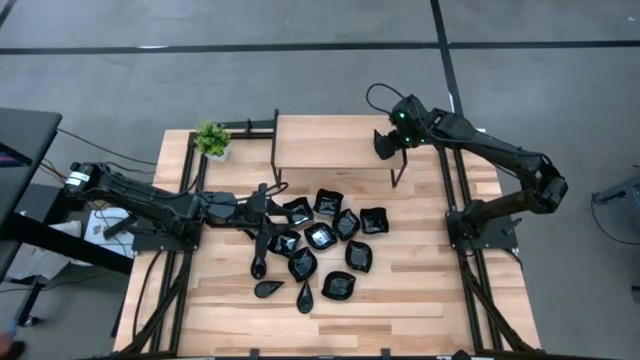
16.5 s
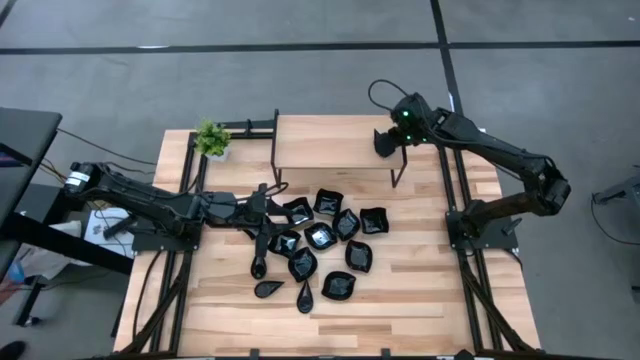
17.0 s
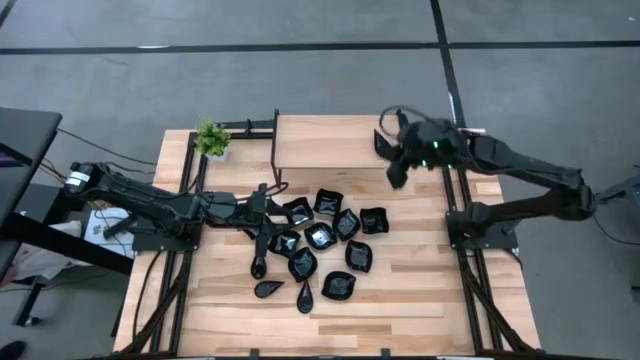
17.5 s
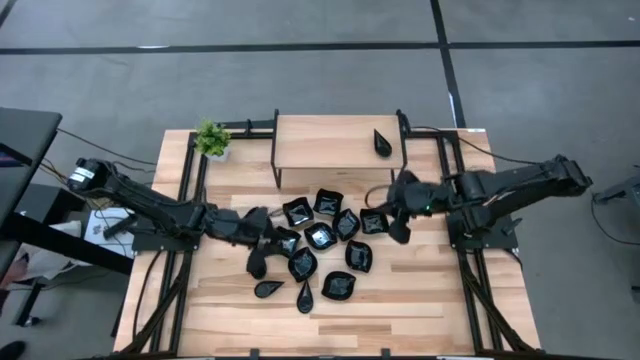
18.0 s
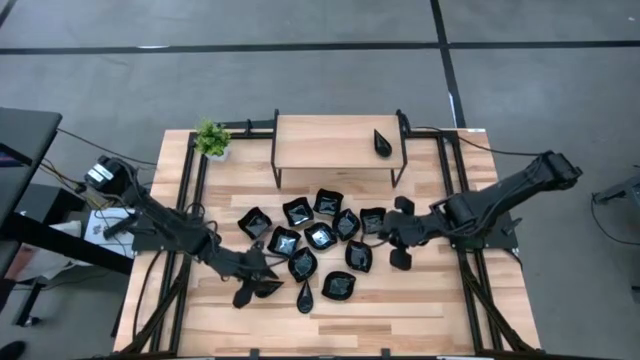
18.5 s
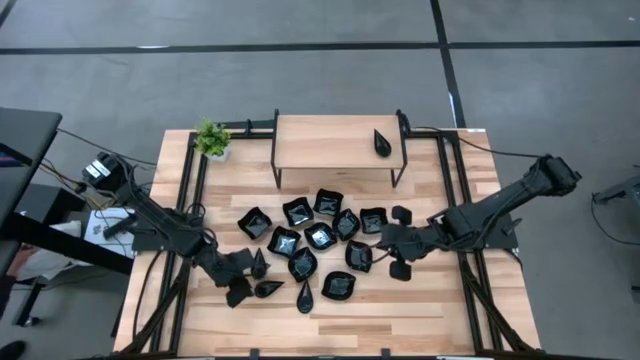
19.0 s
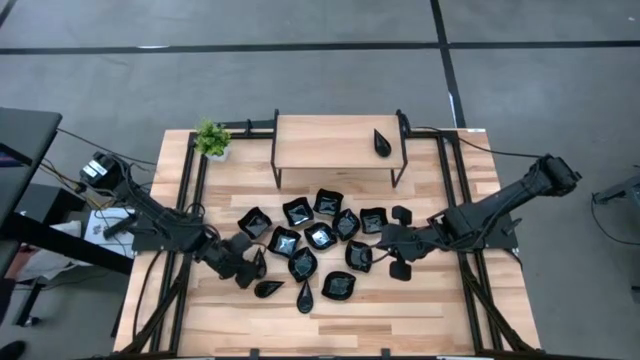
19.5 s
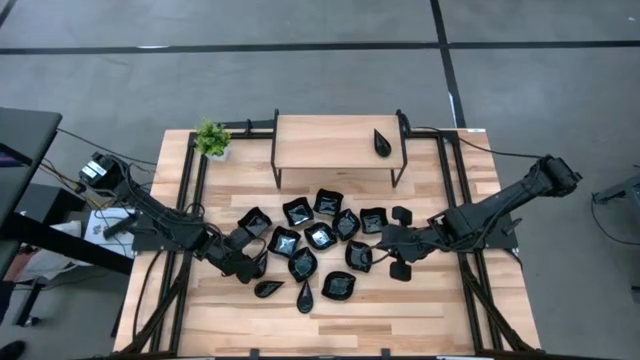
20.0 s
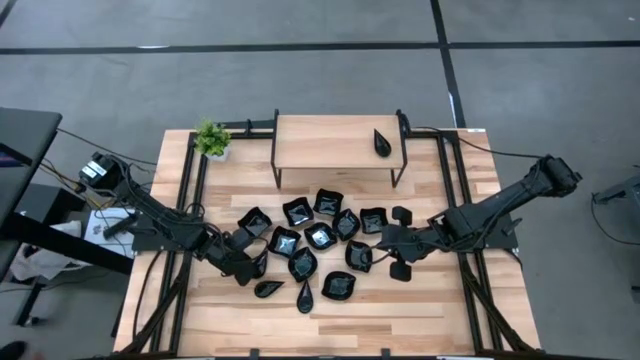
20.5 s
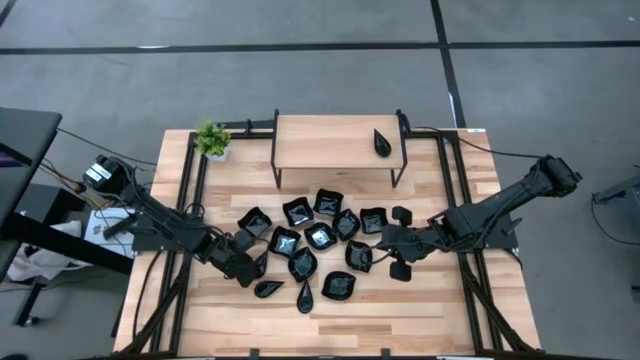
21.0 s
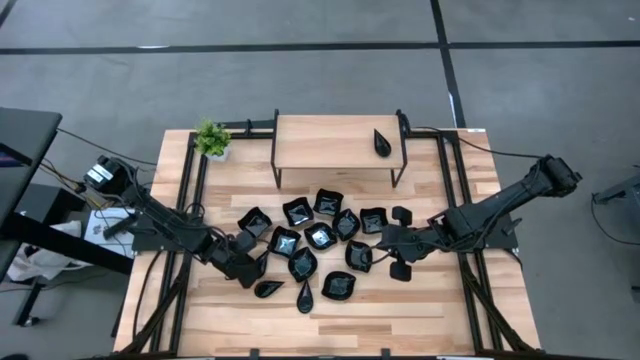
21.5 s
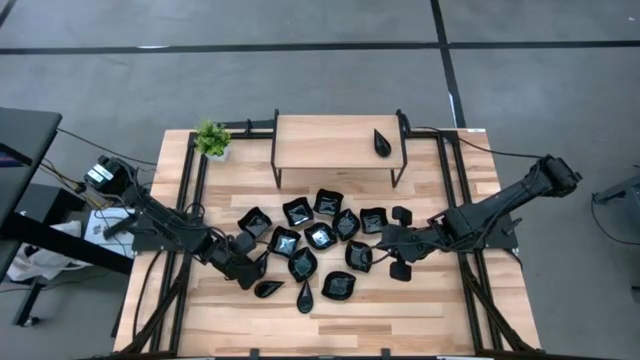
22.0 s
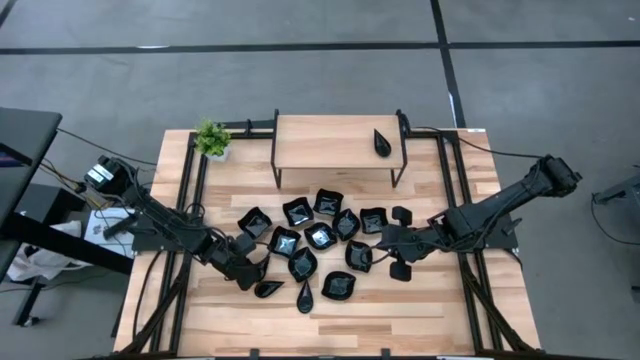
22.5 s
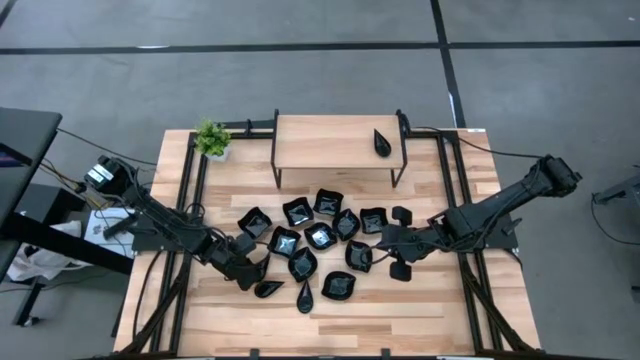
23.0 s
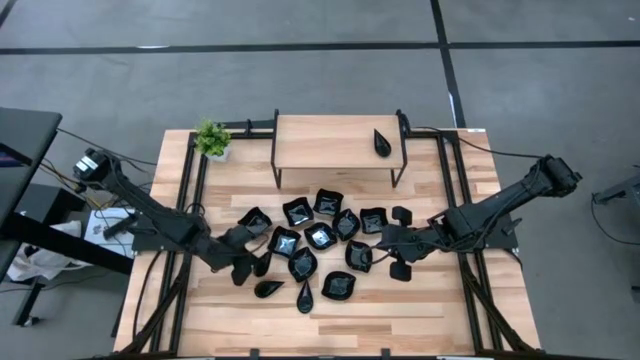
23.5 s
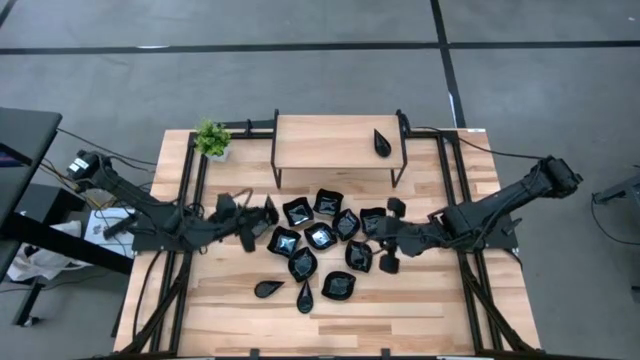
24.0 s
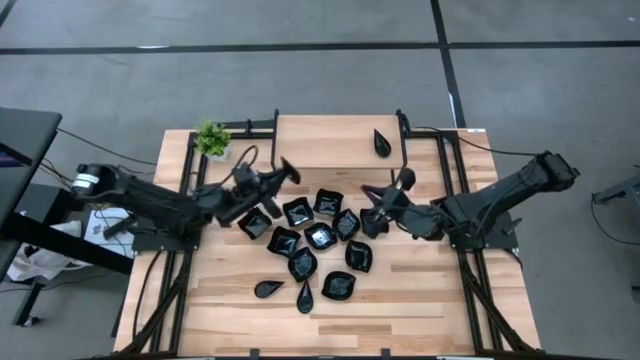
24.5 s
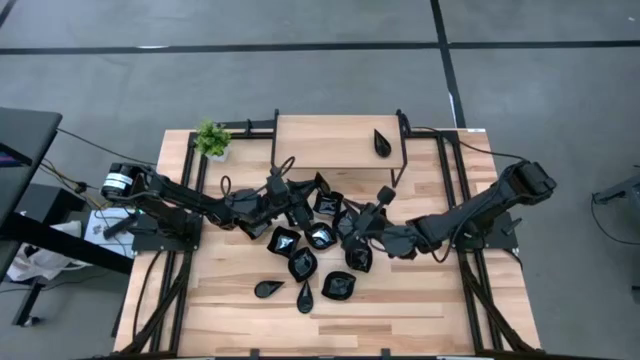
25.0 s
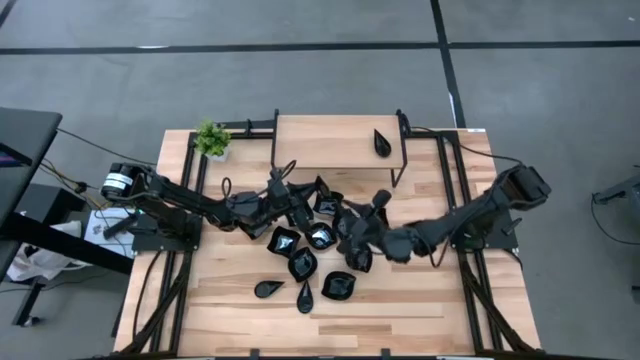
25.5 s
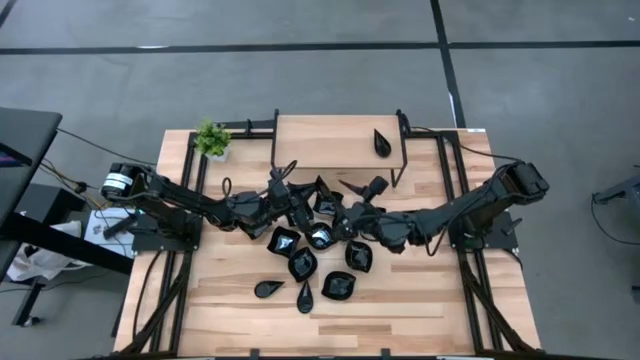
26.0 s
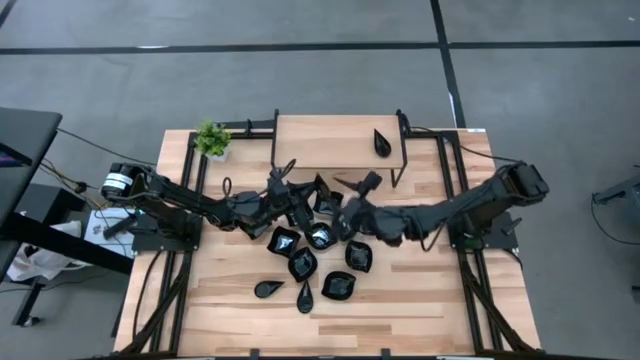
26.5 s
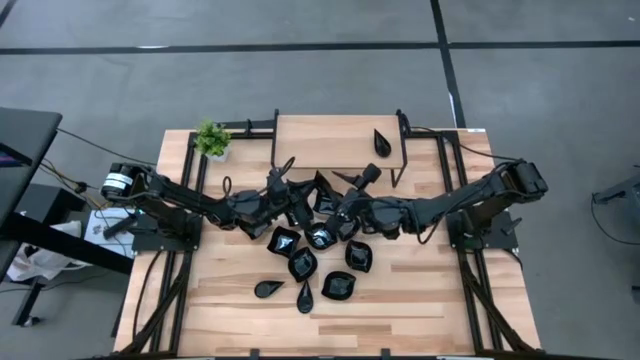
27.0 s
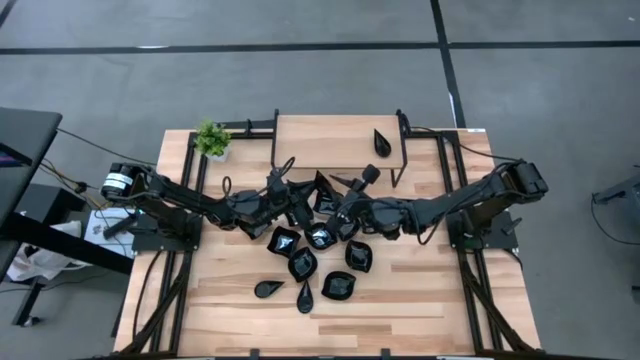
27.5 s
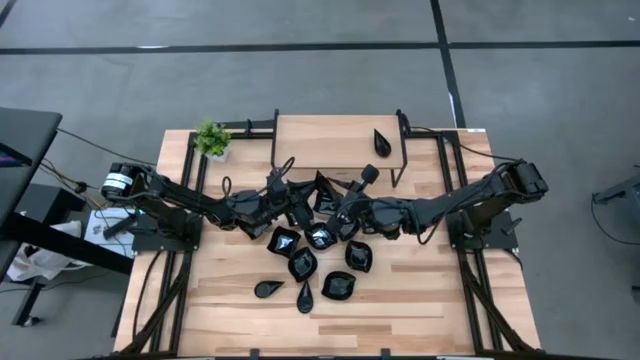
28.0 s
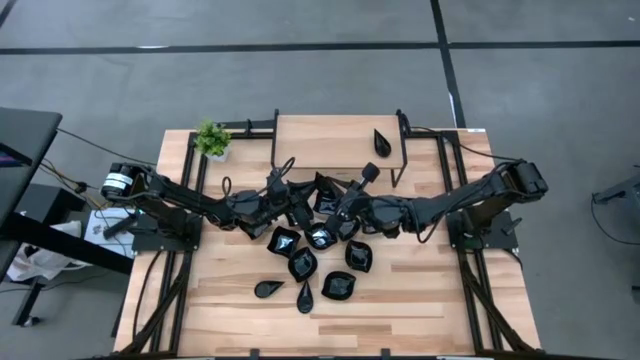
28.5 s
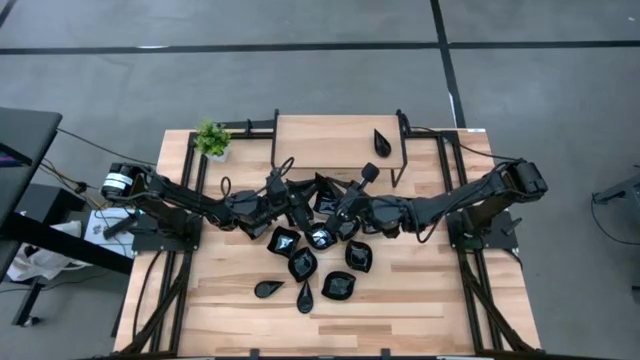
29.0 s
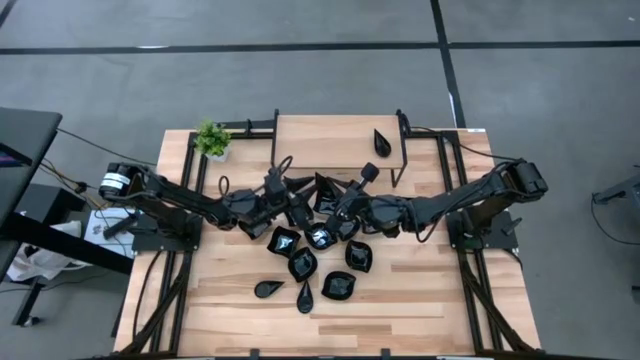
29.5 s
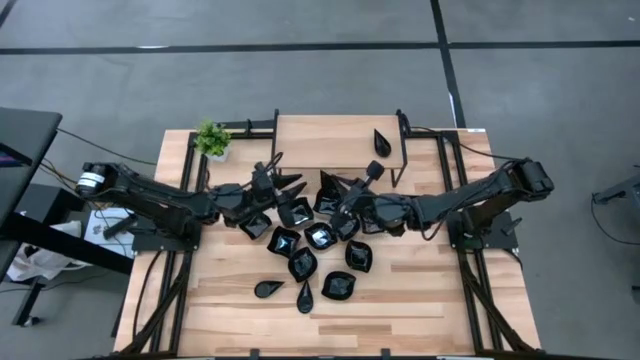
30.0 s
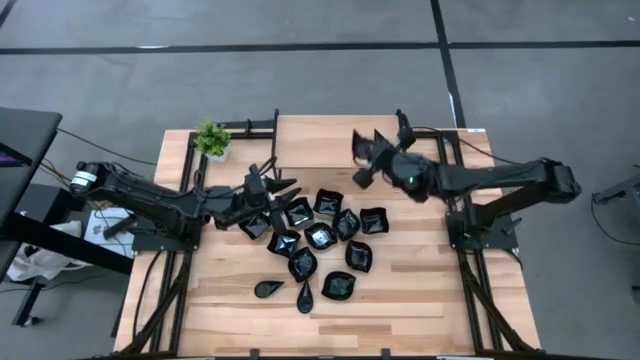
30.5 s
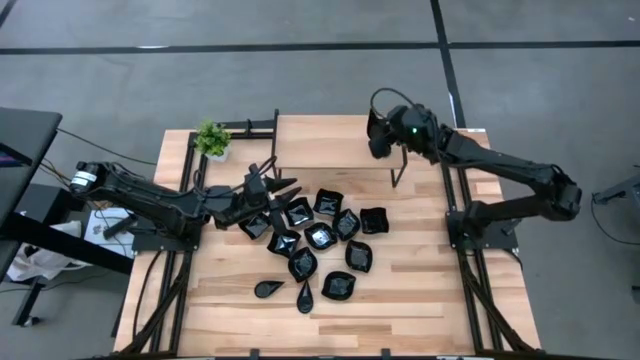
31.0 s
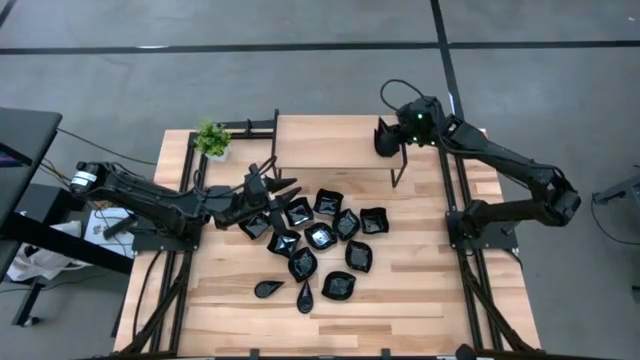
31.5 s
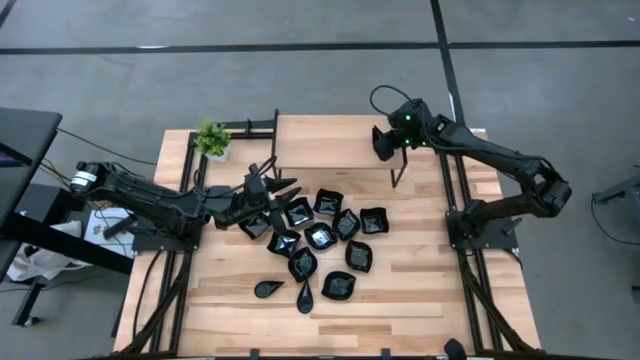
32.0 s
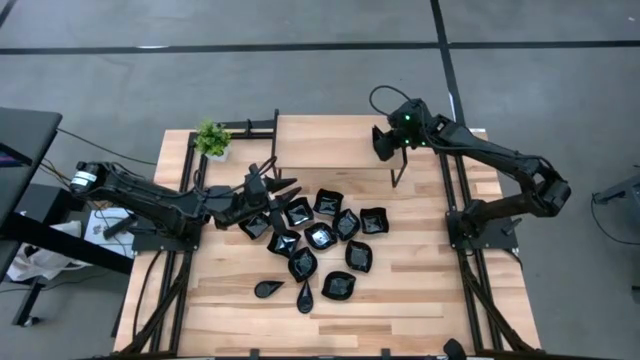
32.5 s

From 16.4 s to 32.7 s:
Task: Pick & Place Mini shaped plates
Stack the black drop shaped plate on top of the black drop shaped plate on the shelf

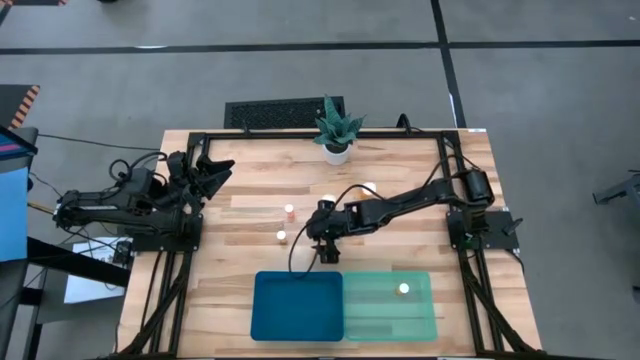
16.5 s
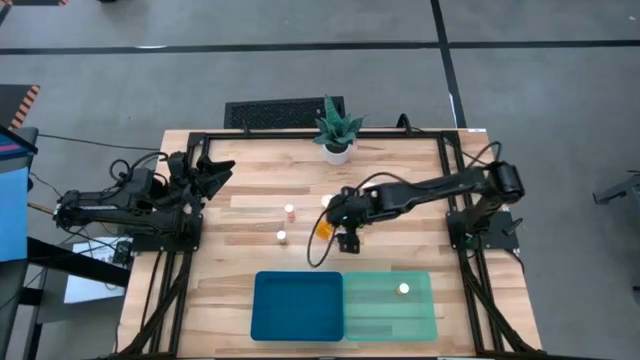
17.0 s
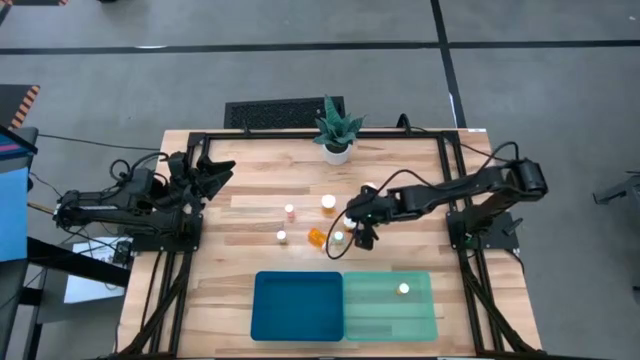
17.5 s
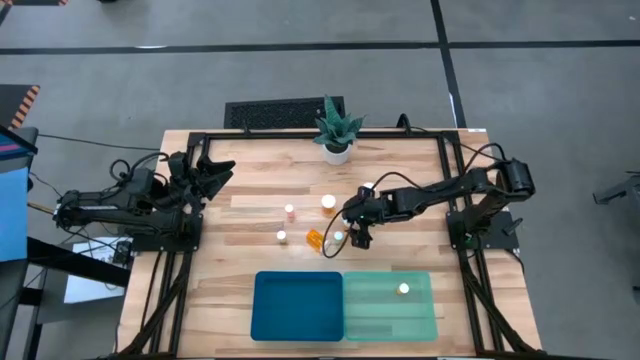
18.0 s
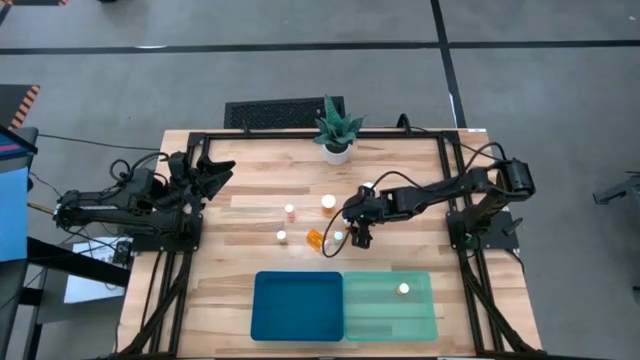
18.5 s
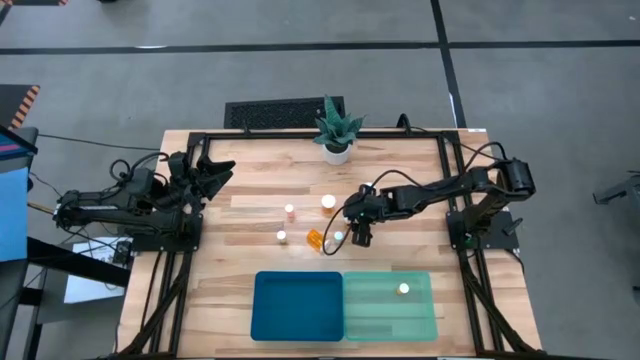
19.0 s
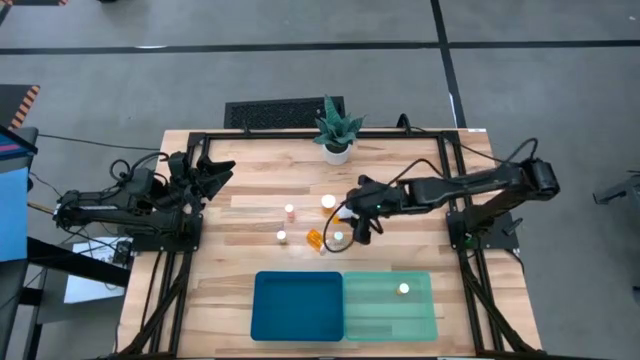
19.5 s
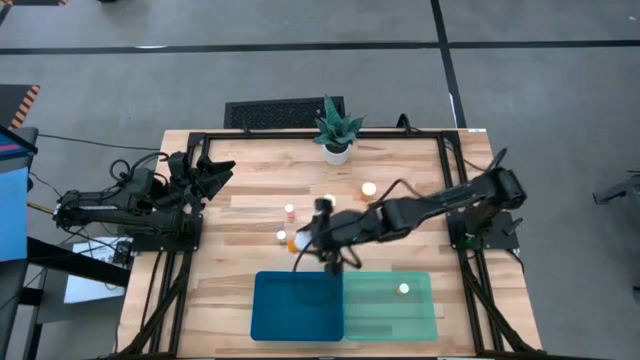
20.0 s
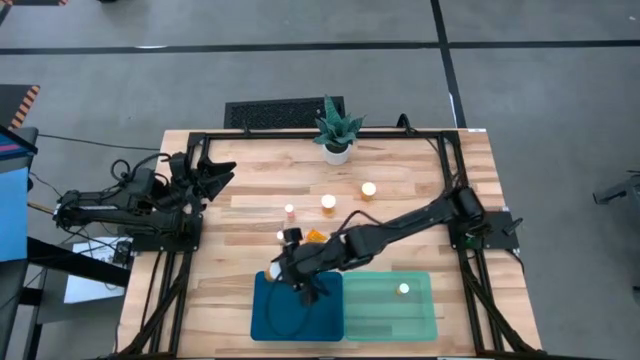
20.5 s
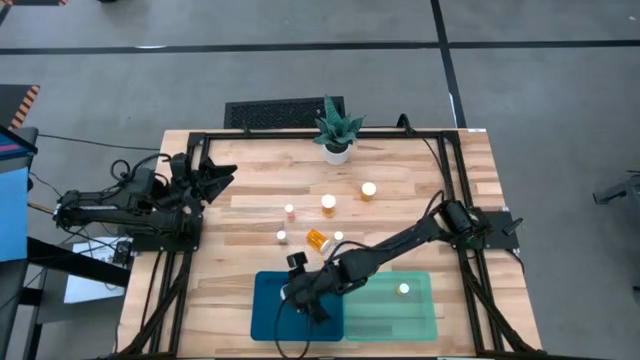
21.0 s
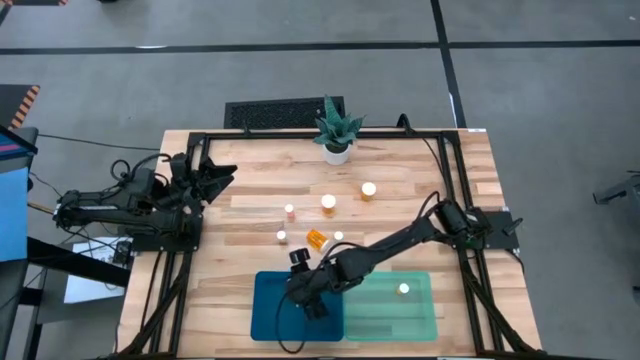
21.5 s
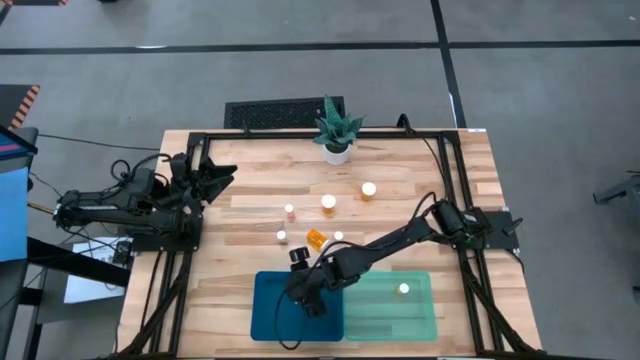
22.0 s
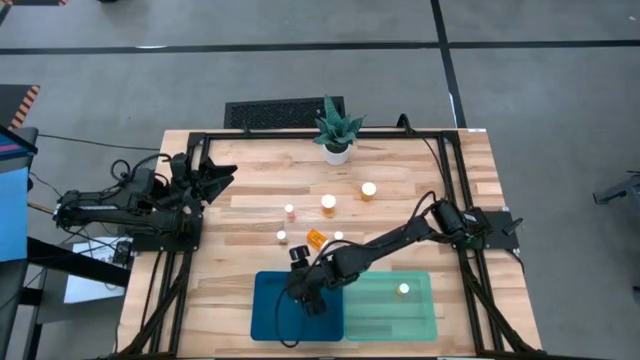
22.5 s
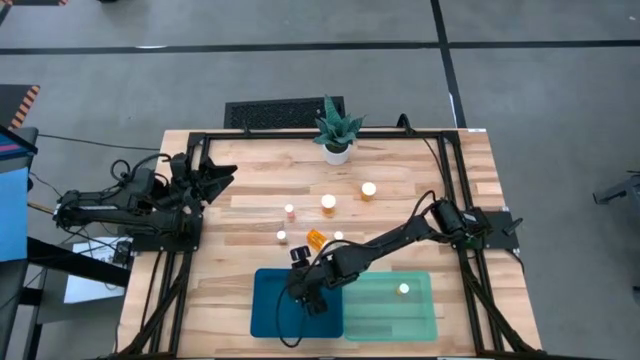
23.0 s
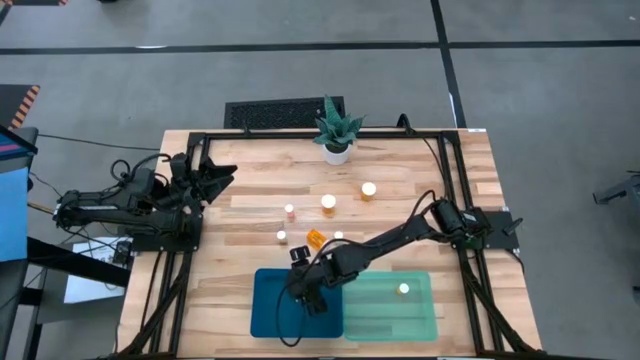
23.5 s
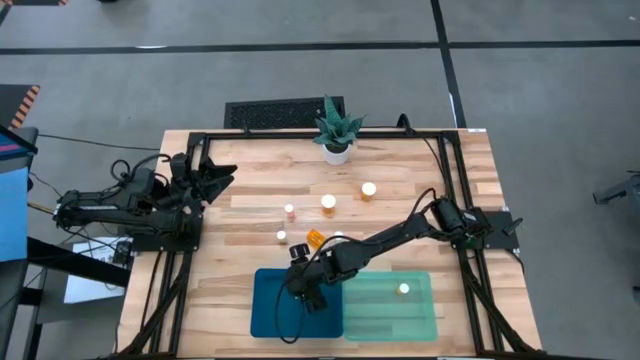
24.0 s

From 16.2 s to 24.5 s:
Task: Pick and place medicine bottles into bin by pill shape (circle, oval)
Put the large orange pill bottle into the blue bin
